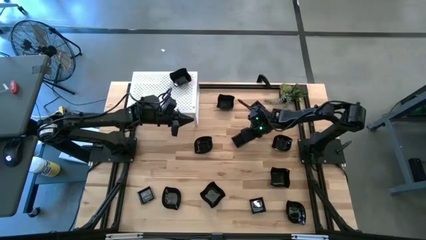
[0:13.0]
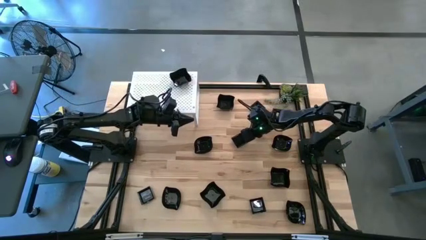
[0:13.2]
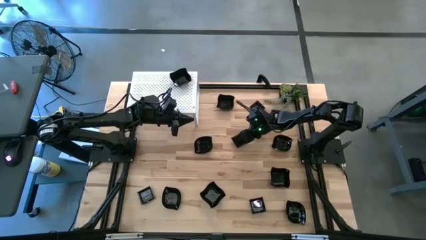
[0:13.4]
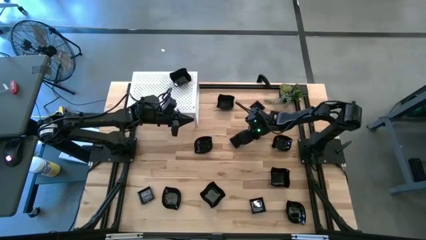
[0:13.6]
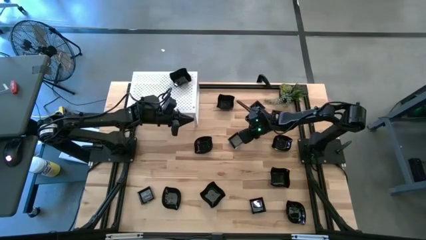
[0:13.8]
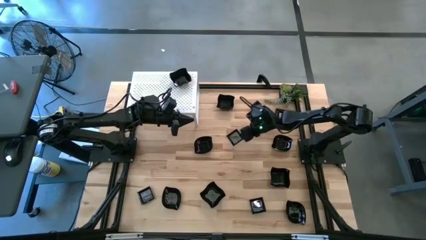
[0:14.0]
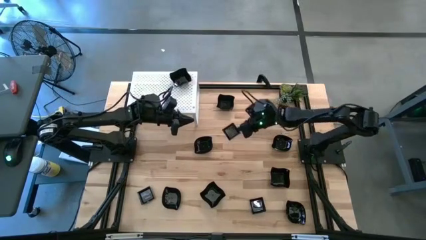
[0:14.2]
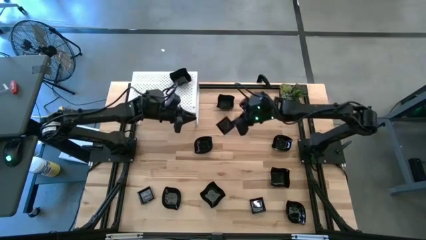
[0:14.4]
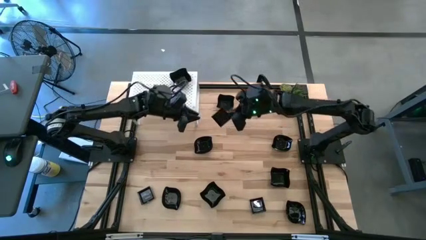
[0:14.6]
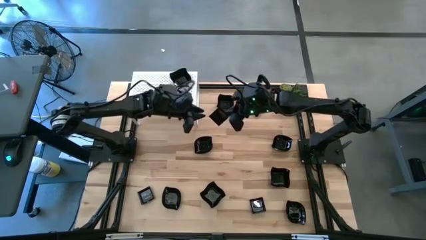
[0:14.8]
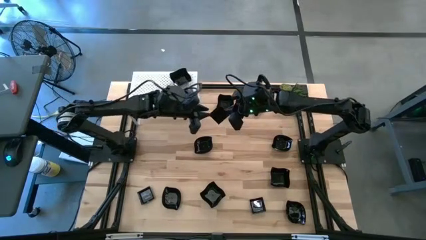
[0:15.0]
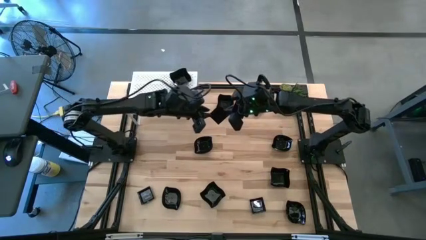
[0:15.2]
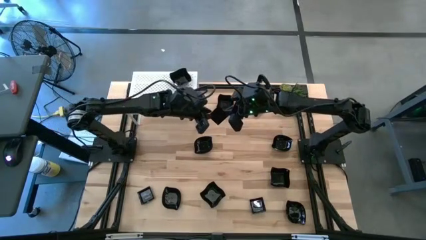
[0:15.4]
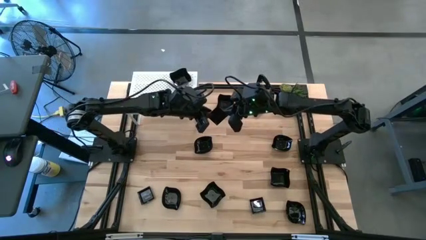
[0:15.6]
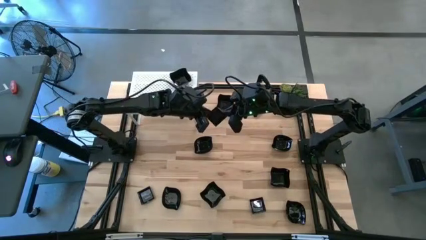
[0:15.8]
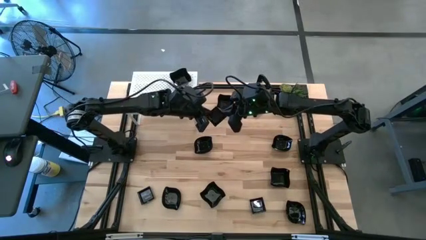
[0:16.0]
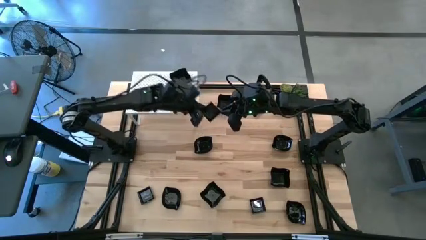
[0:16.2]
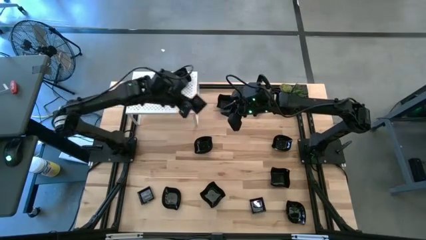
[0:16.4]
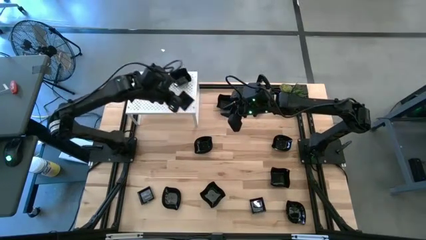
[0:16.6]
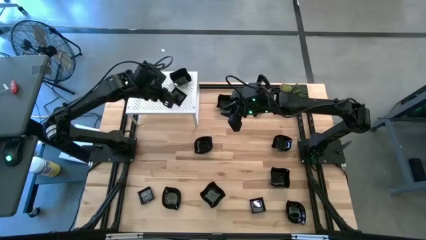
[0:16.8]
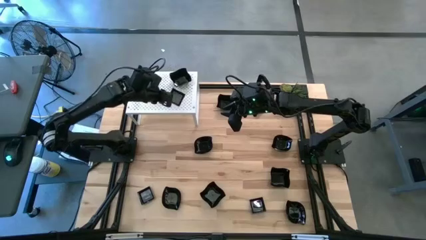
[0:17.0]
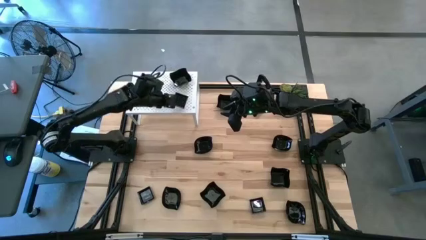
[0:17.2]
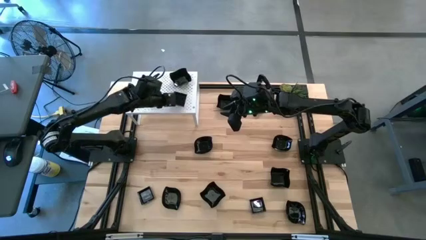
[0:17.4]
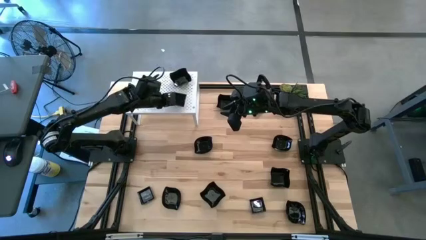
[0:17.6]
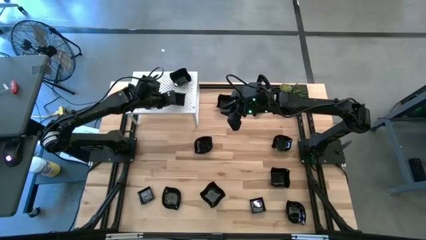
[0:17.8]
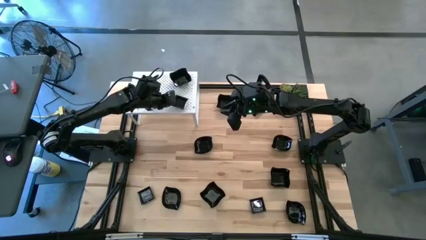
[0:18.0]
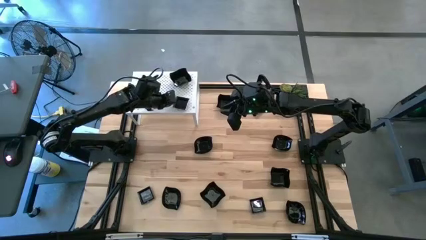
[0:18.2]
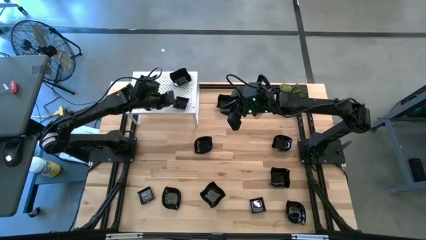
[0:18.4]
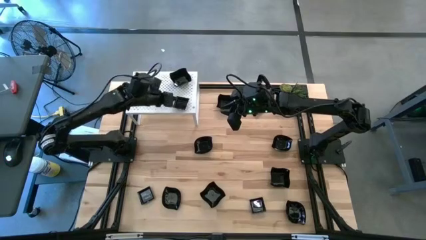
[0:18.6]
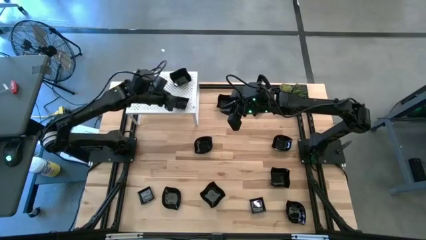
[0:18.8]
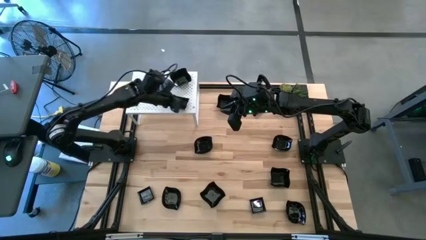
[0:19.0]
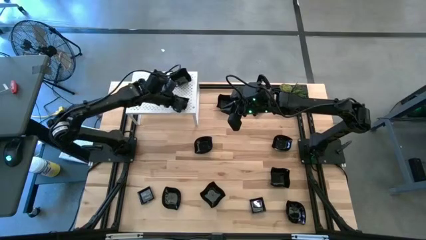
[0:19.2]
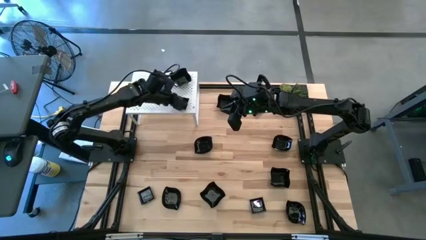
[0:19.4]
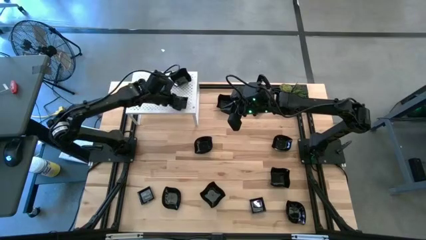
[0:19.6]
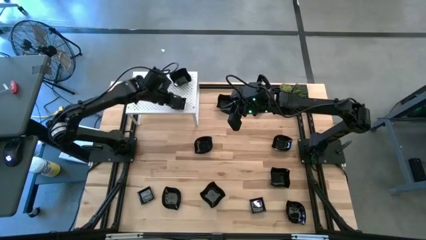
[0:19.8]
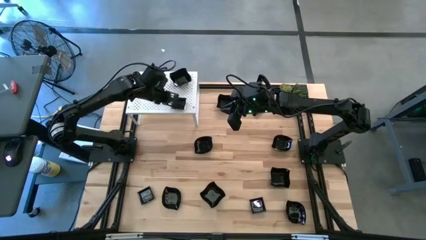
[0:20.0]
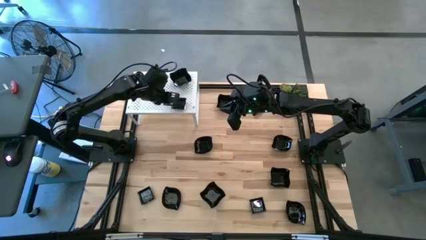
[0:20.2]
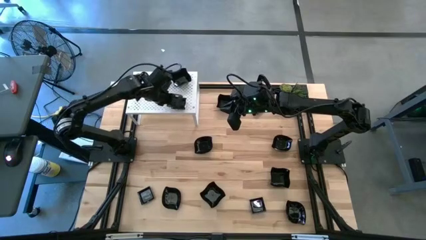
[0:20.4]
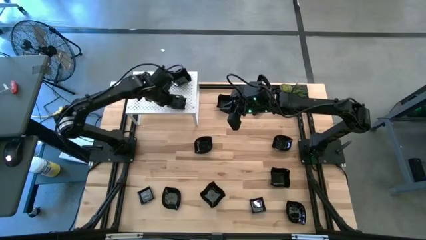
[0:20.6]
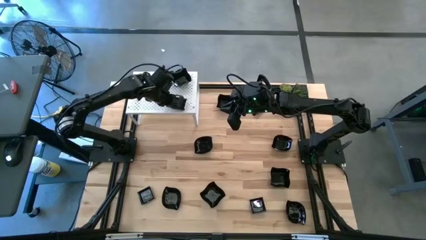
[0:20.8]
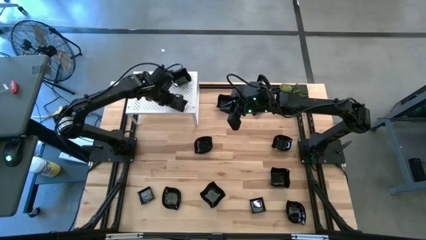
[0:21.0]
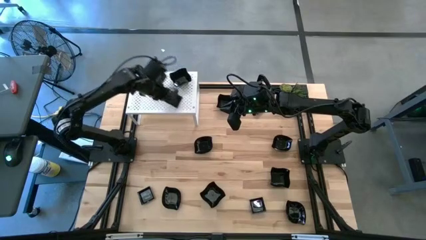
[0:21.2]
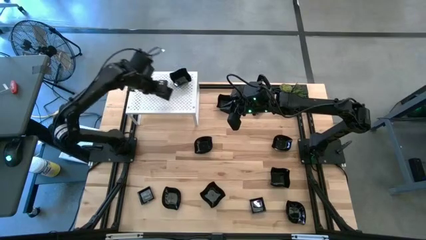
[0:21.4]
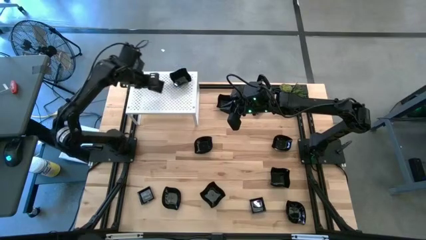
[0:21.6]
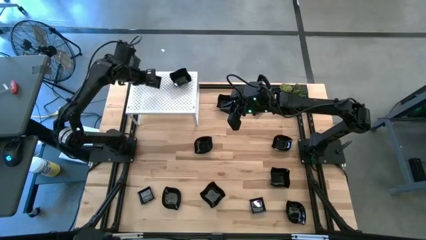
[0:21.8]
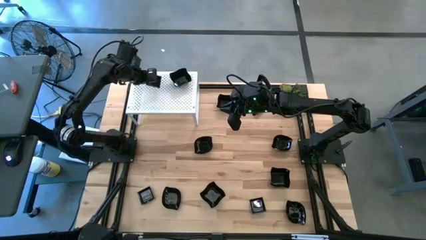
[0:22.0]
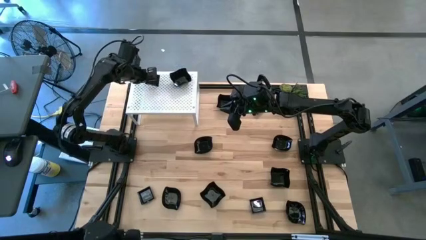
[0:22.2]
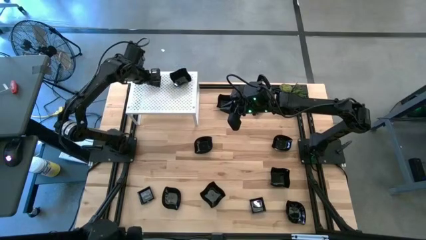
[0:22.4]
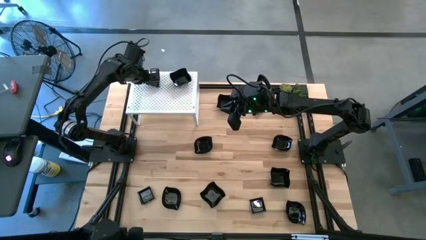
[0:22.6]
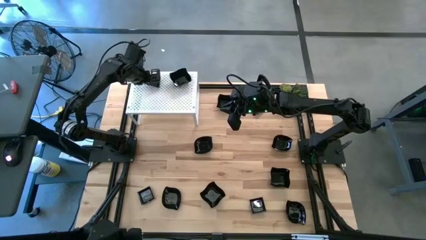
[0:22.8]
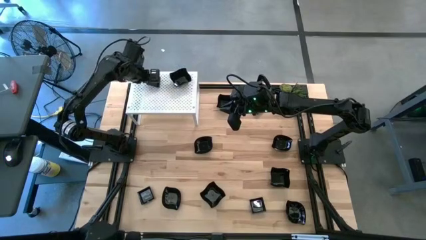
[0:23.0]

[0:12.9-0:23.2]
Task: Pick & Place Mini shaped plates
Put the black square plate on the shelf

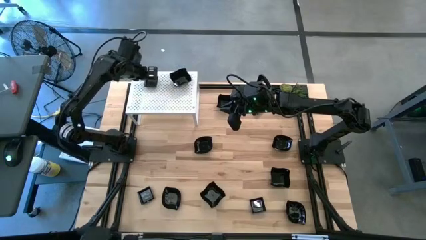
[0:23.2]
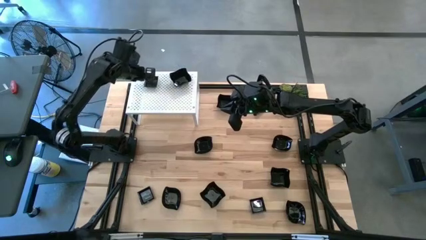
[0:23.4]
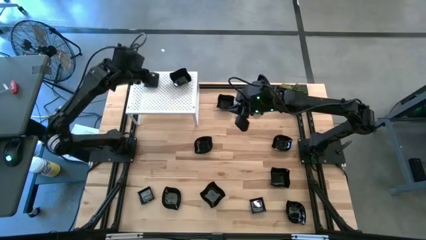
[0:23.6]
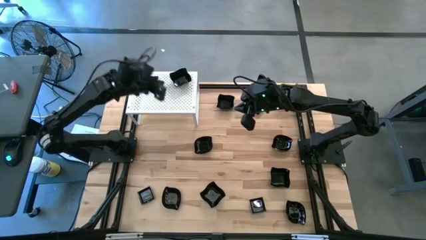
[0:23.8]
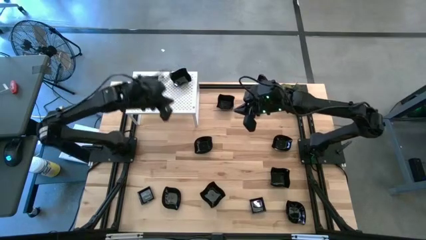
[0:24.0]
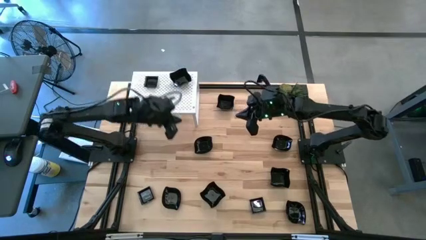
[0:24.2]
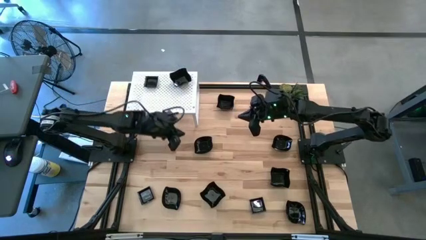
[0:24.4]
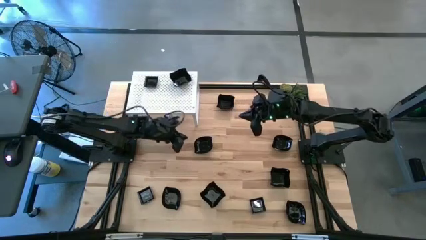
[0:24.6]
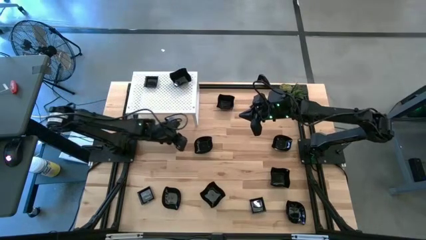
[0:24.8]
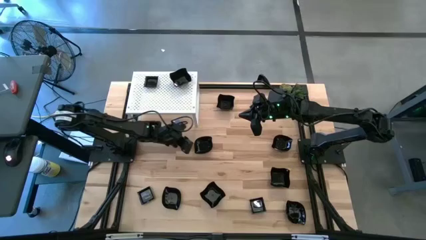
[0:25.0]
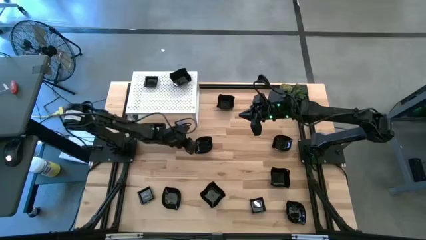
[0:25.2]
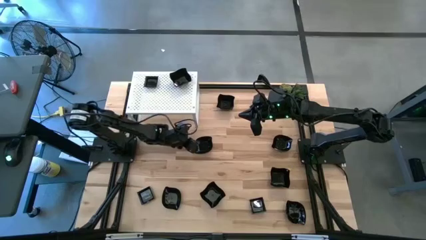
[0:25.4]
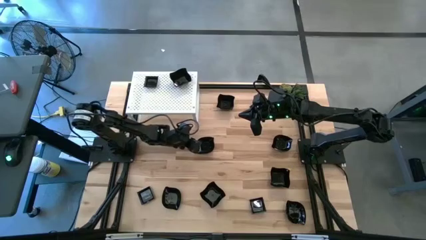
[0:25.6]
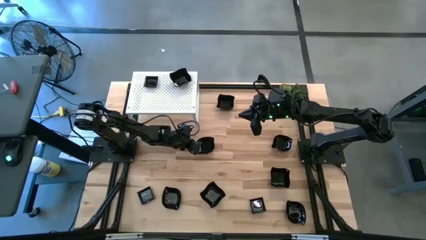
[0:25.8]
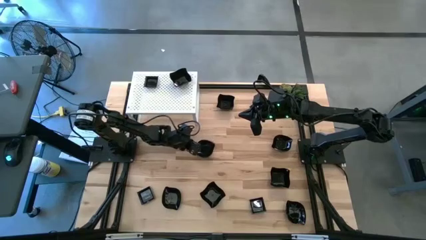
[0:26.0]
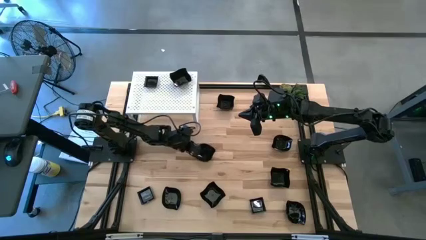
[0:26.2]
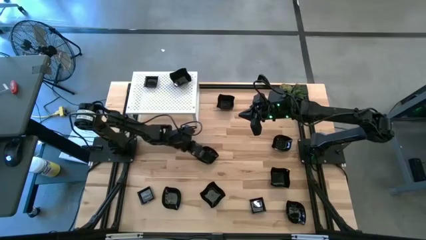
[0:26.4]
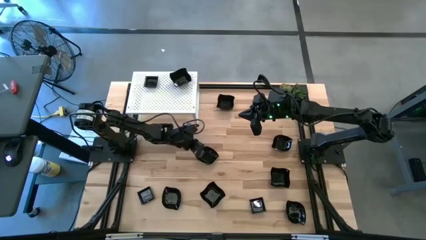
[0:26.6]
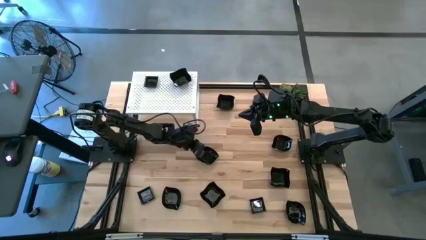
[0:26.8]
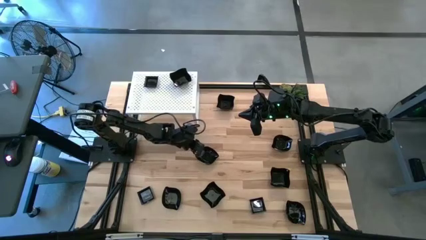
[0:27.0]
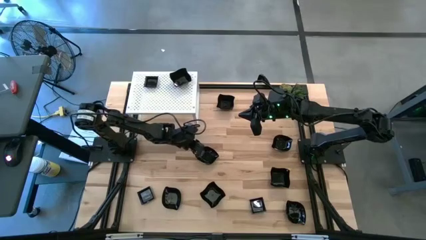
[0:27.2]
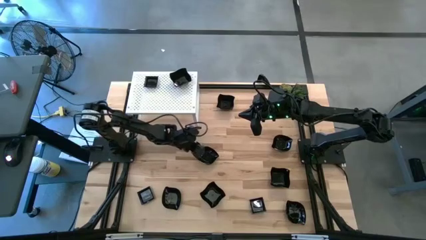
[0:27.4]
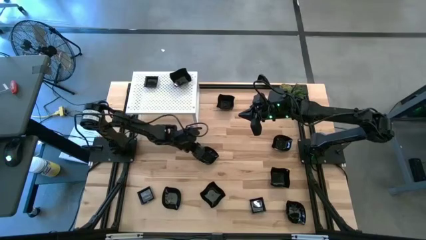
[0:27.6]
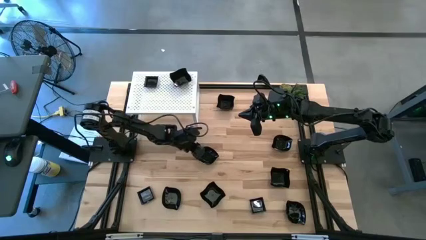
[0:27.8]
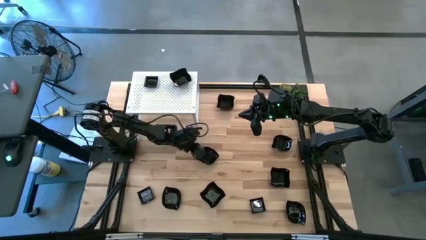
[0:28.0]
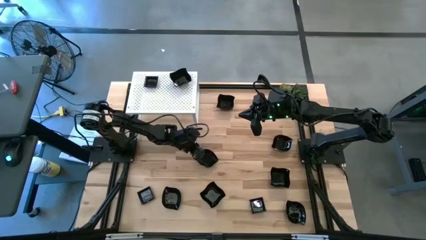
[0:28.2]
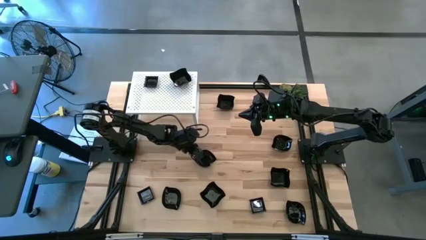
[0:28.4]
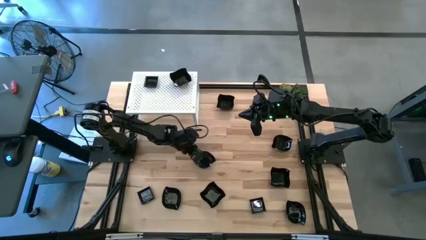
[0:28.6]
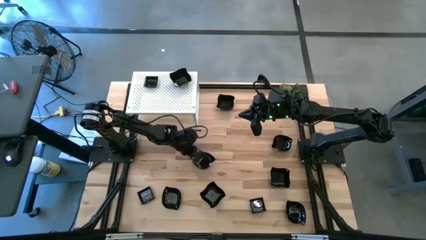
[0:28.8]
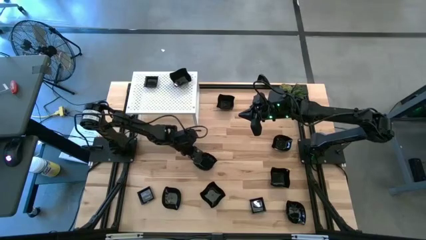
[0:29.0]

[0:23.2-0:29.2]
Put the black leaf shaped plate on the shelf
